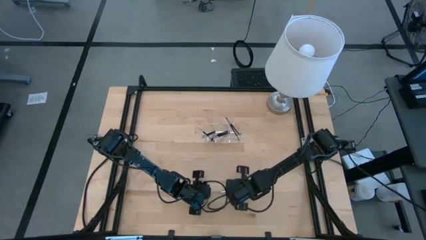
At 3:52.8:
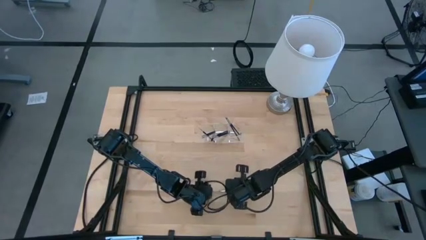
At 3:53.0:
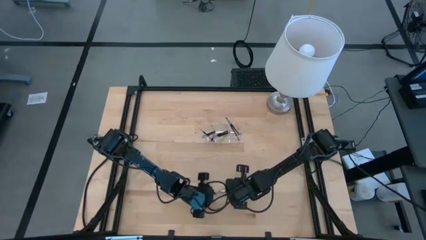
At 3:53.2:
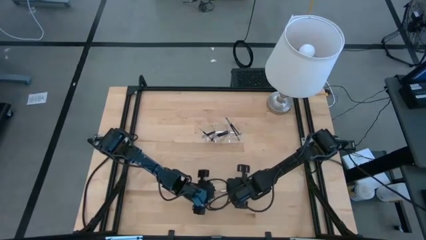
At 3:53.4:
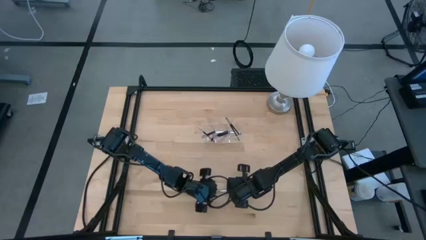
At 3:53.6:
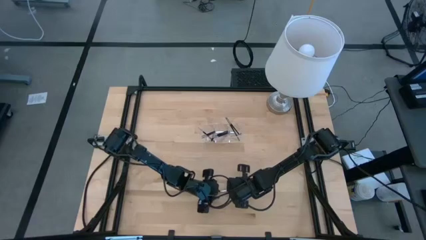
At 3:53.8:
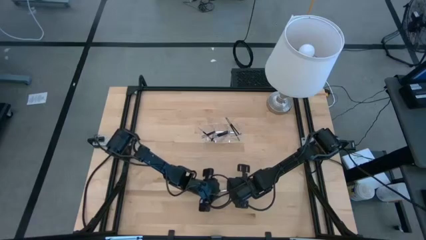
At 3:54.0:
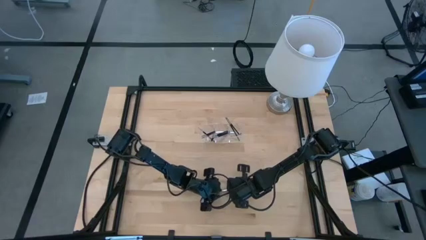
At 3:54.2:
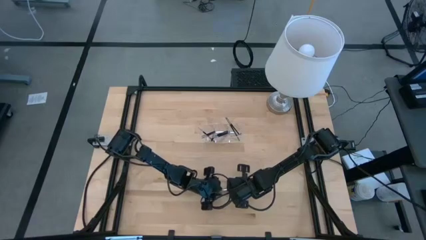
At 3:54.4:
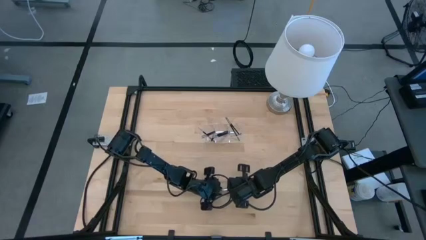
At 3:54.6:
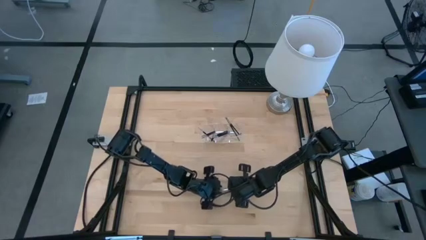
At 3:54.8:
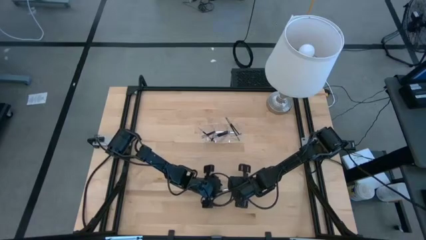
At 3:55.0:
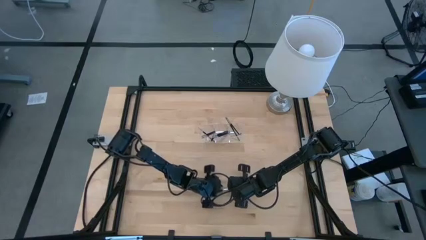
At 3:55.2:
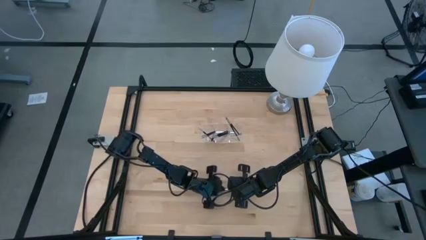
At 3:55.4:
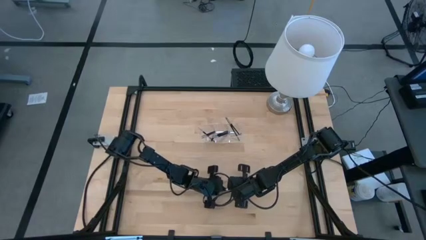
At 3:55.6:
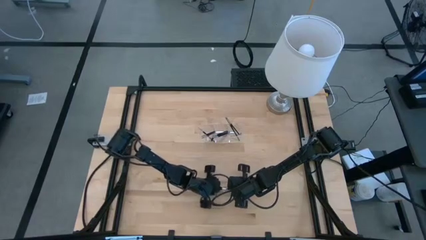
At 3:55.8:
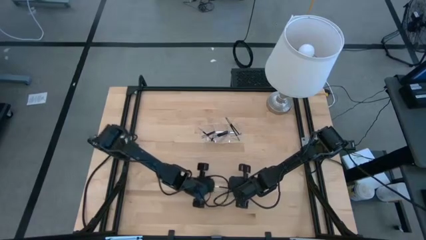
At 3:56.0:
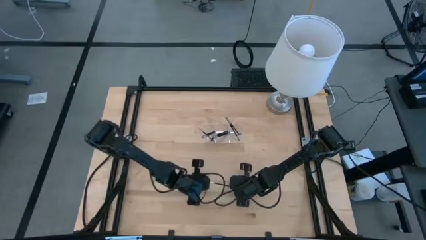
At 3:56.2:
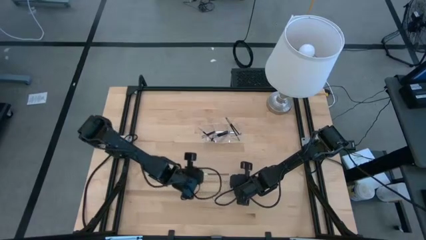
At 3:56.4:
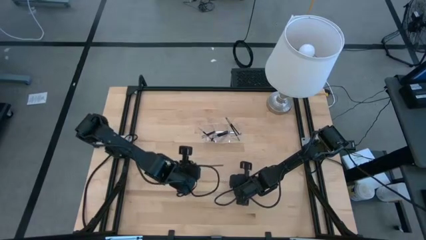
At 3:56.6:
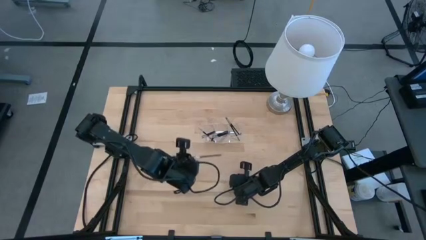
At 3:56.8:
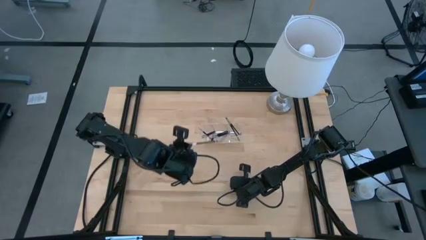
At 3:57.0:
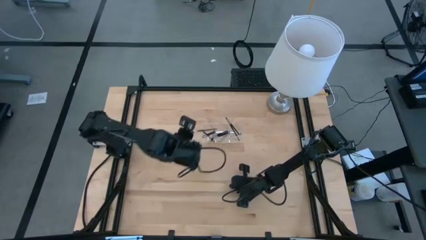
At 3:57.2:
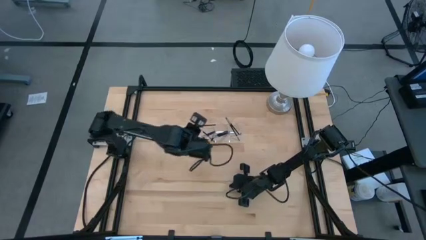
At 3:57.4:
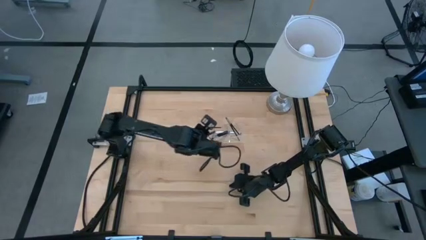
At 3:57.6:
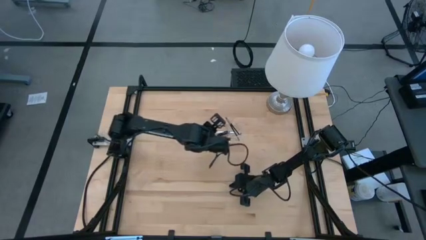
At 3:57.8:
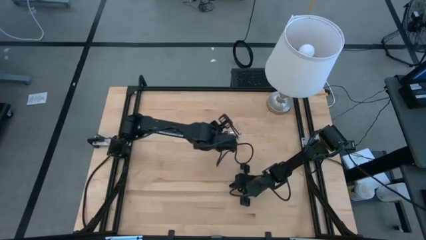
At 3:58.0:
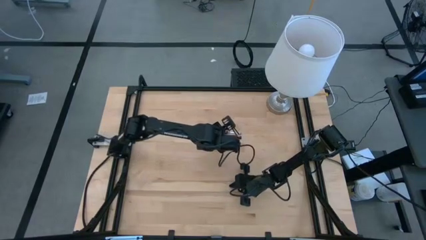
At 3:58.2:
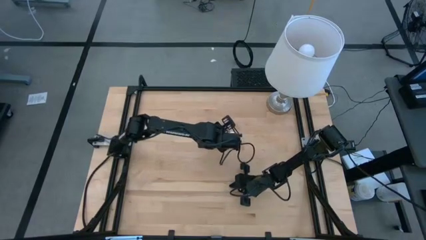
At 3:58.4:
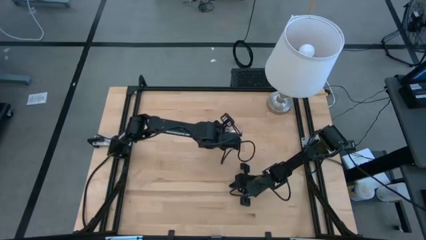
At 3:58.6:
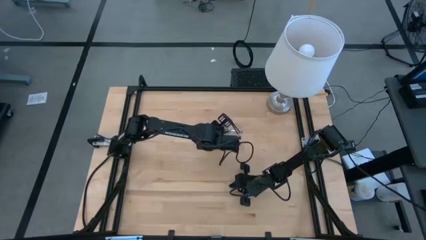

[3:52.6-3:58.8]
Task: Pick & Place Makeup Supplies
Put the makeup brush into the transparent organizer

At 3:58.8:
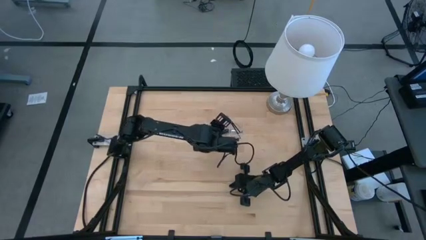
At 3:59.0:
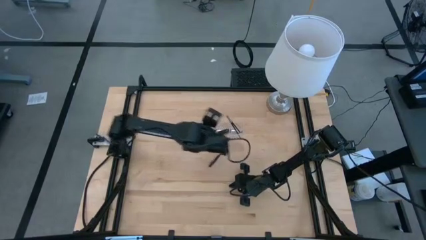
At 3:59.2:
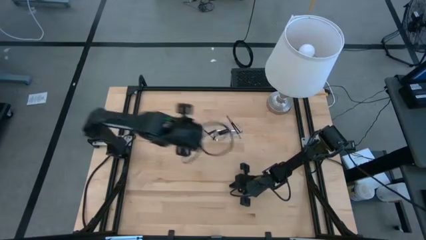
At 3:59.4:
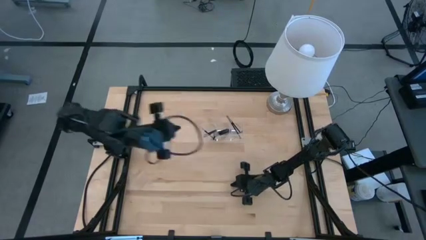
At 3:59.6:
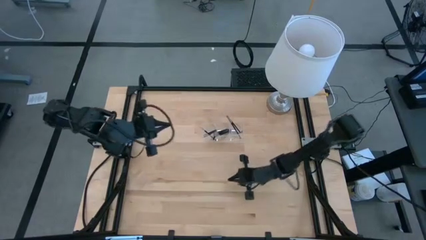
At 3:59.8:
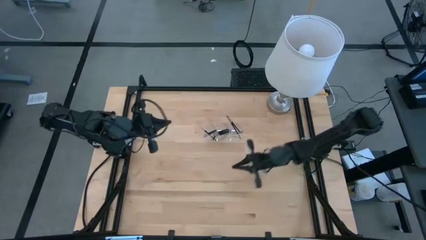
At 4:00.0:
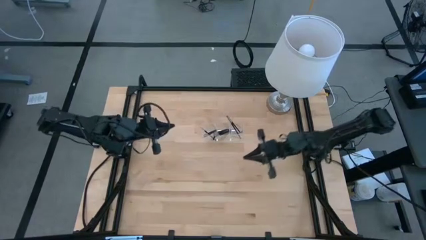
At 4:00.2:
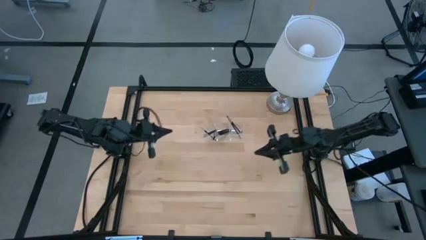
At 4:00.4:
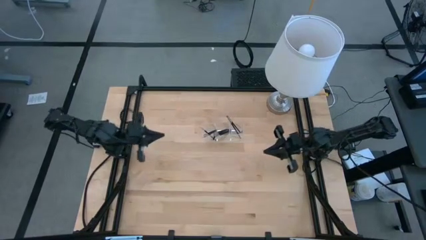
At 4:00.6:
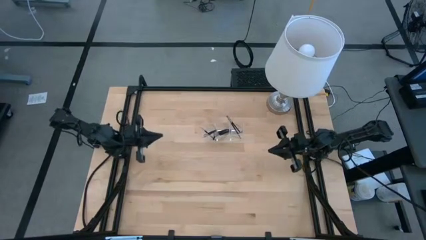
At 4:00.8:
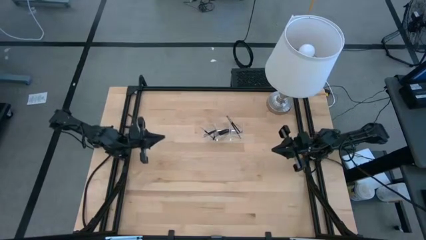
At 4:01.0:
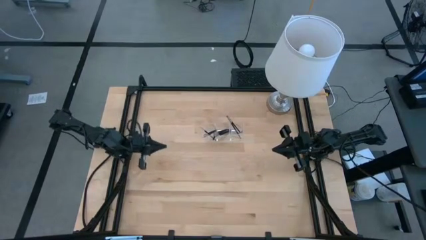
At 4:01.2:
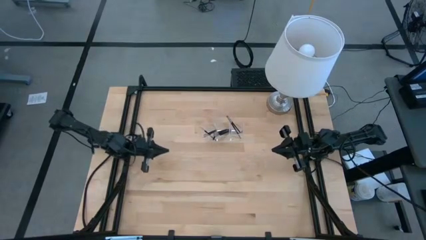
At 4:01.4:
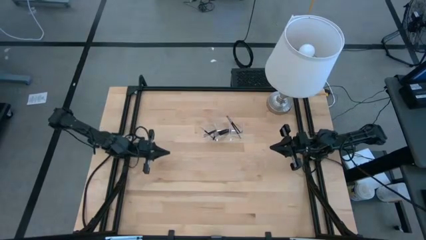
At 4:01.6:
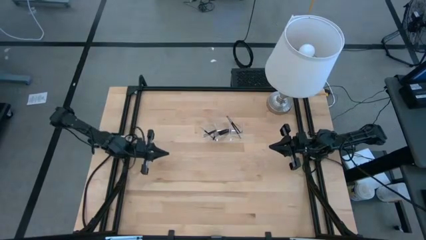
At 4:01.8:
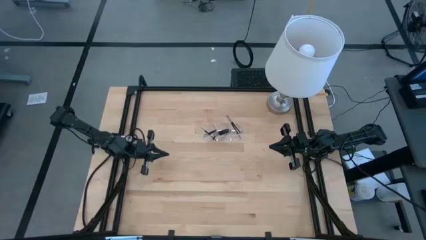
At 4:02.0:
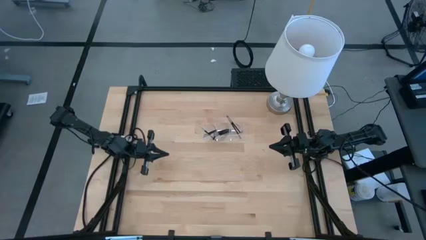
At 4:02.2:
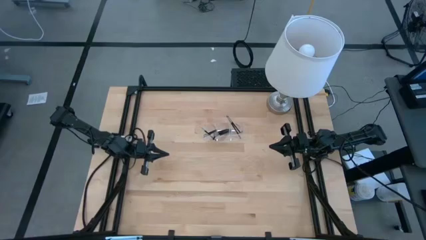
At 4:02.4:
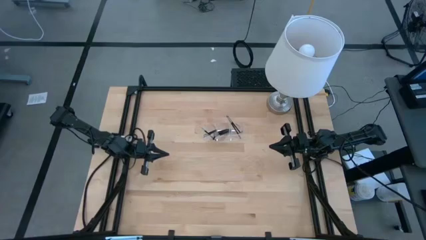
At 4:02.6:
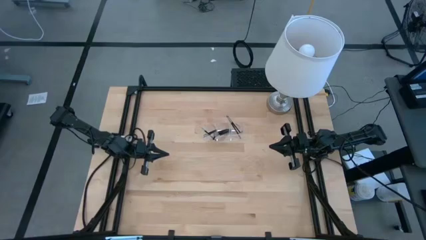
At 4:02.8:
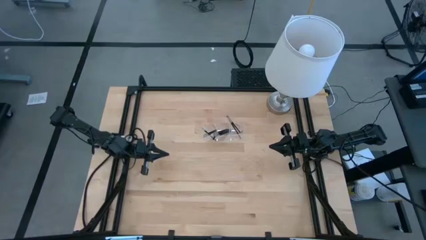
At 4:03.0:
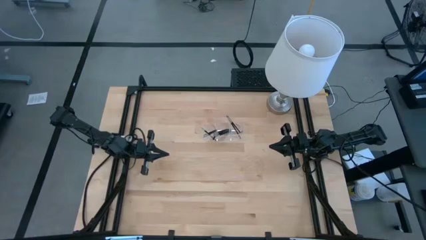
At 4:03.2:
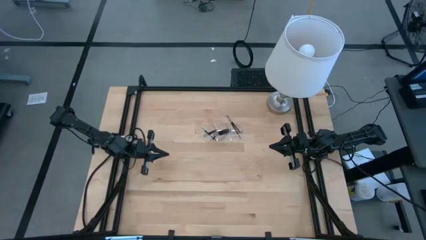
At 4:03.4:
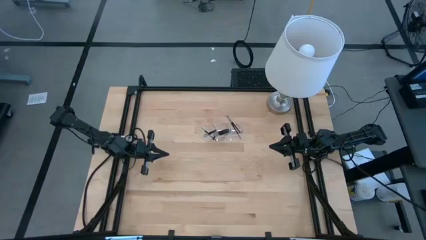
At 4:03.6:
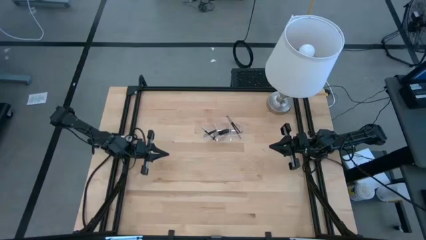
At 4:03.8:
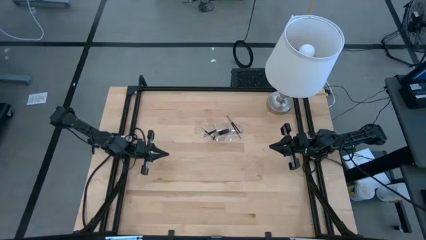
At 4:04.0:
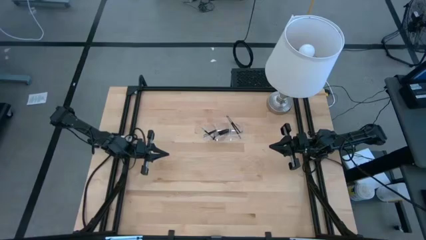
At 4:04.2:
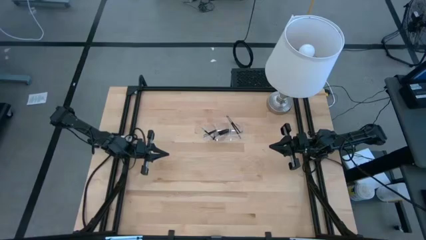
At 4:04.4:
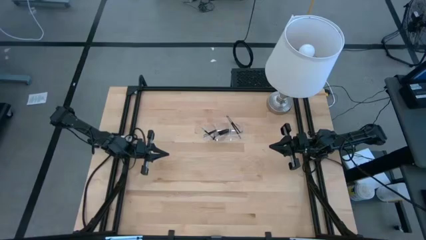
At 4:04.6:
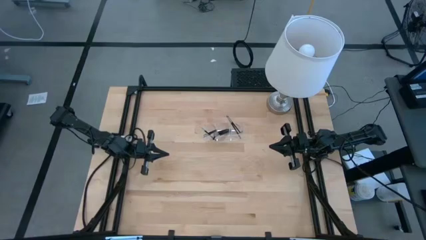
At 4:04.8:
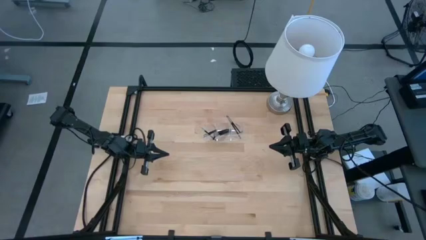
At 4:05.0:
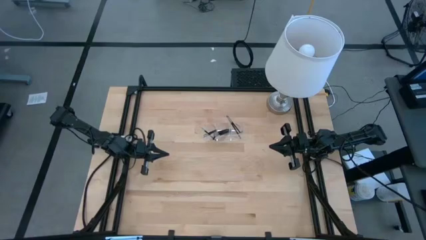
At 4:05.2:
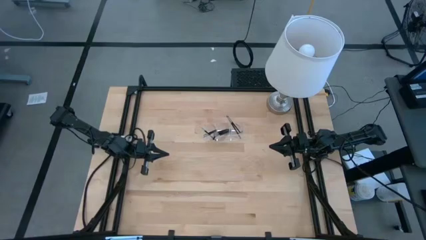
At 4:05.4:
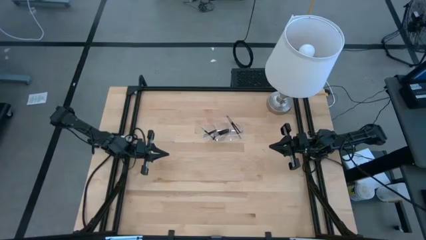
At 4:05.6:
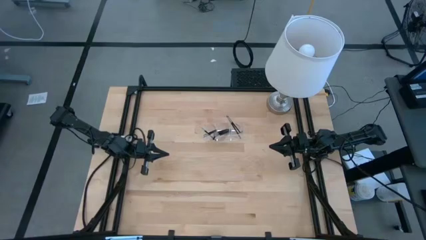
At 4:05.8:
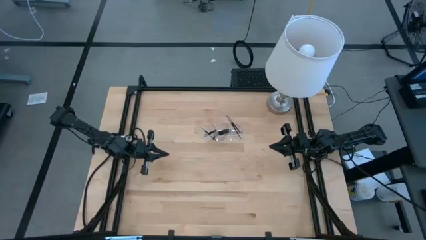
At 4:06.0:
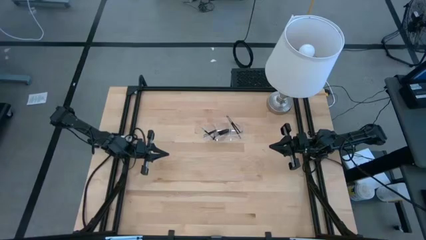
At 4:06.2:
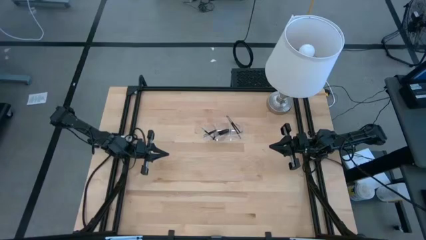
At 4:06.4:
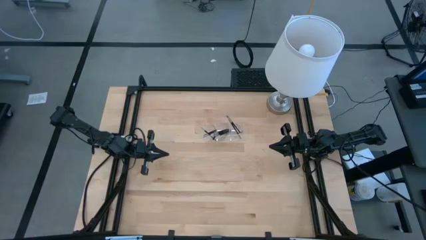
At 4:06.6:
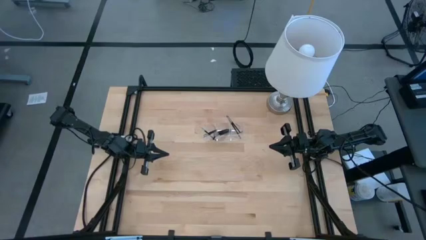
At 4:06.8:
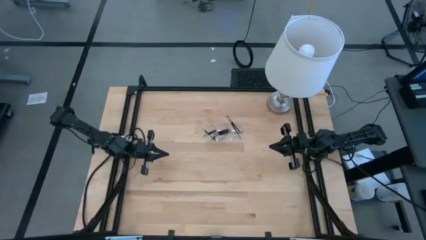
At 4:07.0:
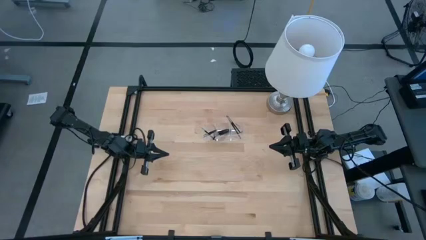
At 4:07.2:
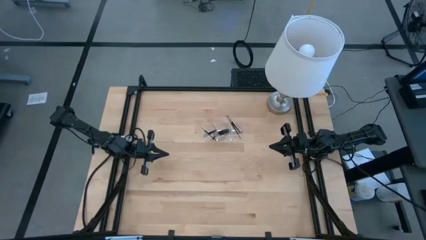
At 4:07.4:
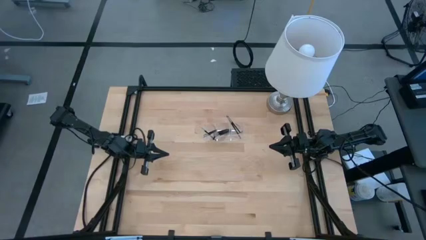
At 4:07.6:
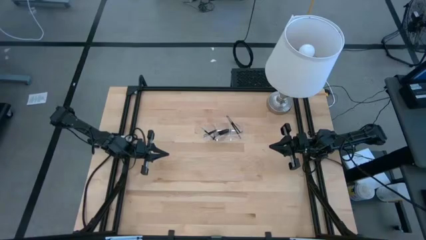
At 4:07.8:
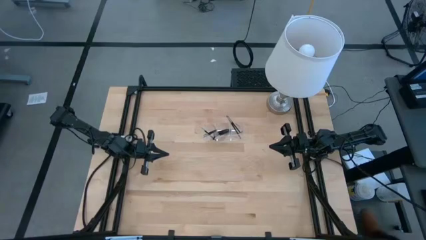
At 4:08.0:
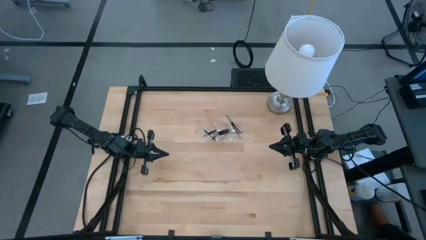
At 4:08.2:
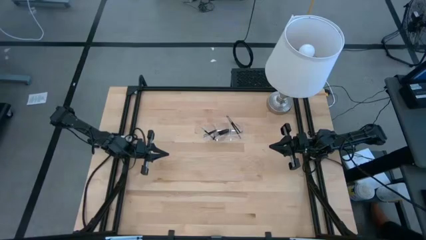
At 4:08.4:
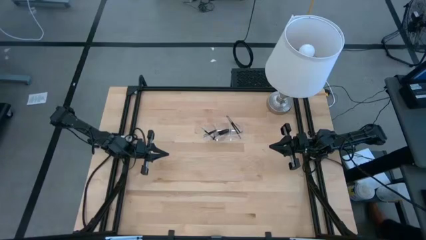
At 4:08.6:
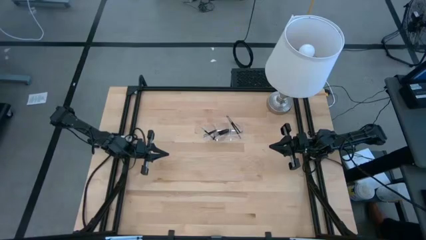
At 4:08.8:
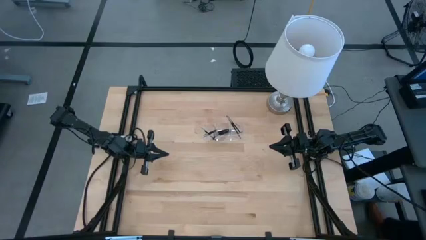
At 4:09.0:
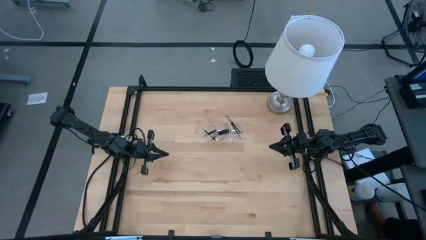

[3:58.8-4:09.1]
Return to Home Position
